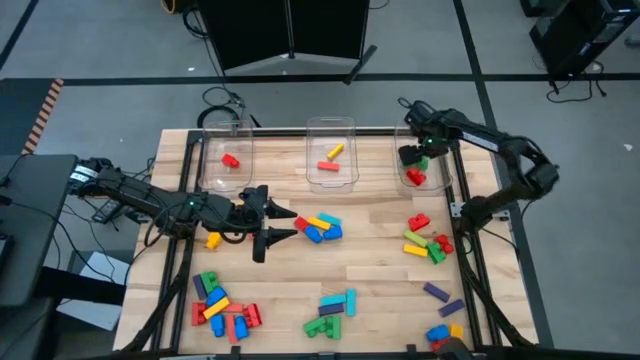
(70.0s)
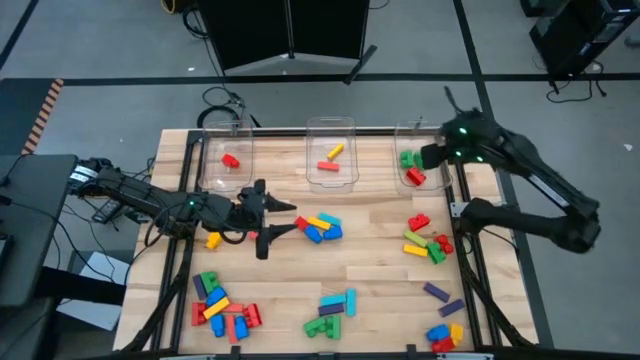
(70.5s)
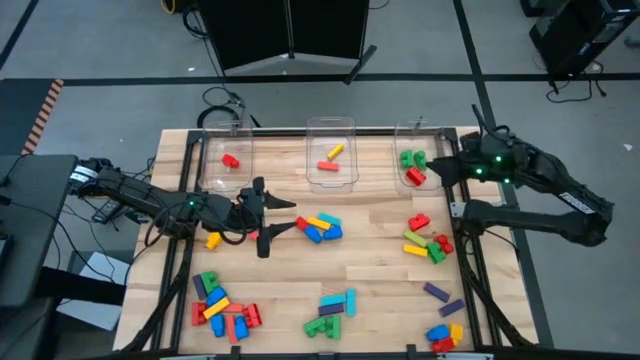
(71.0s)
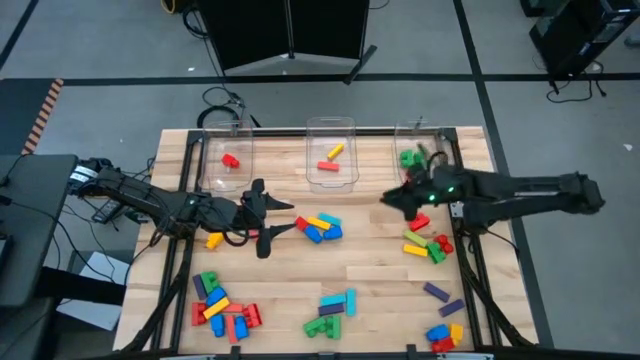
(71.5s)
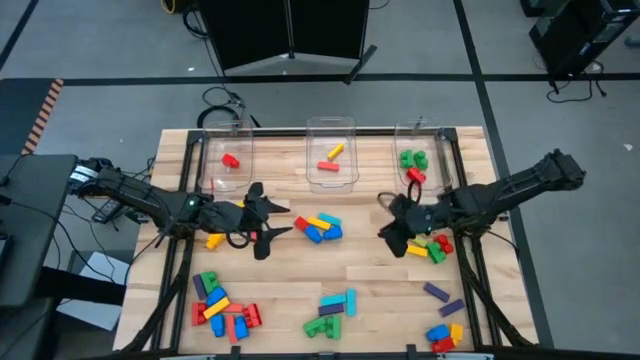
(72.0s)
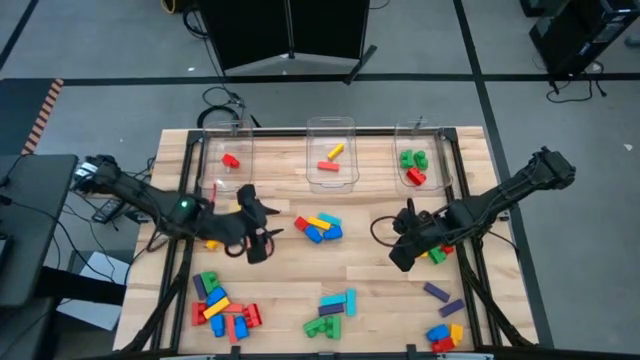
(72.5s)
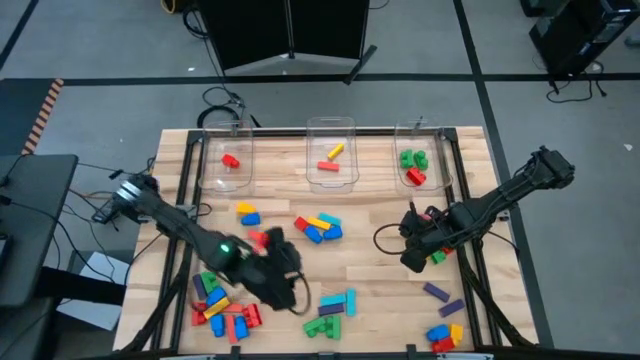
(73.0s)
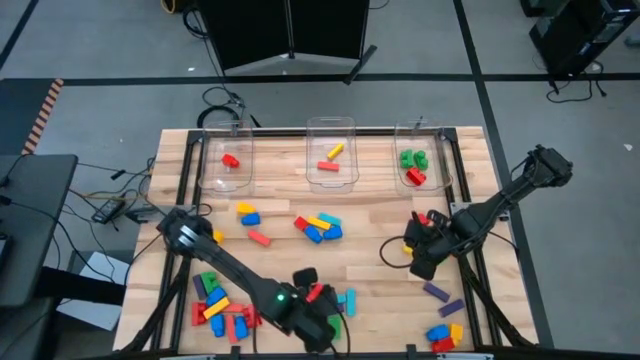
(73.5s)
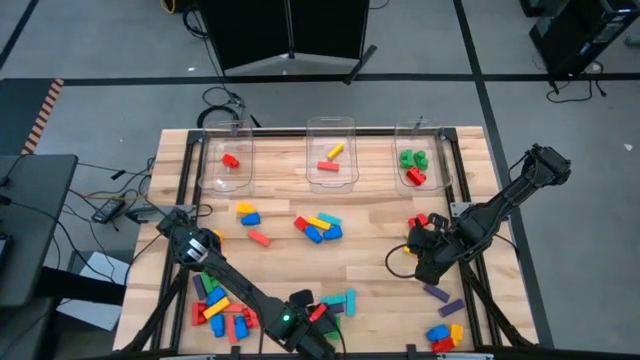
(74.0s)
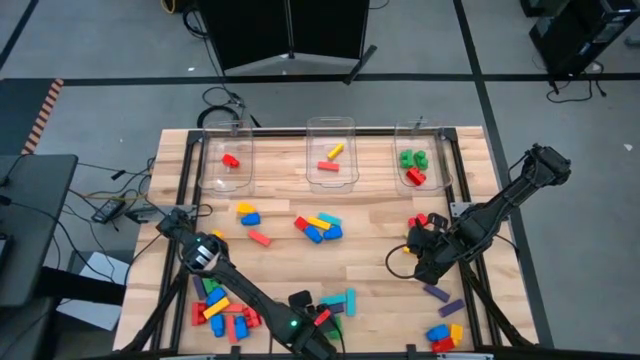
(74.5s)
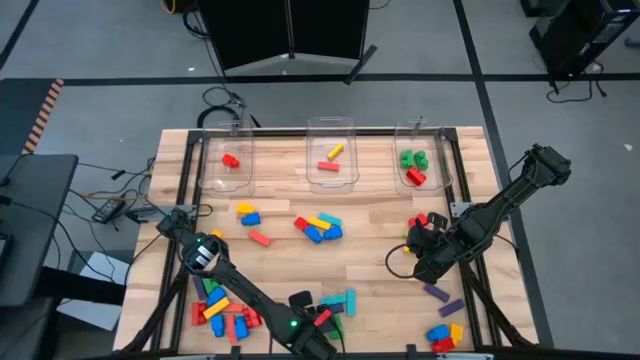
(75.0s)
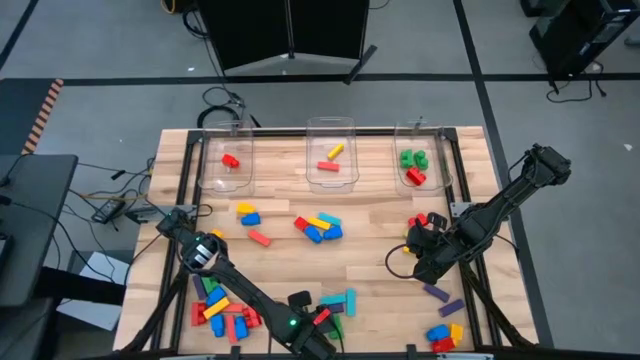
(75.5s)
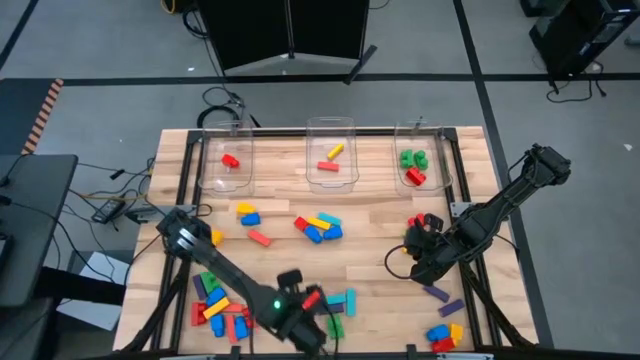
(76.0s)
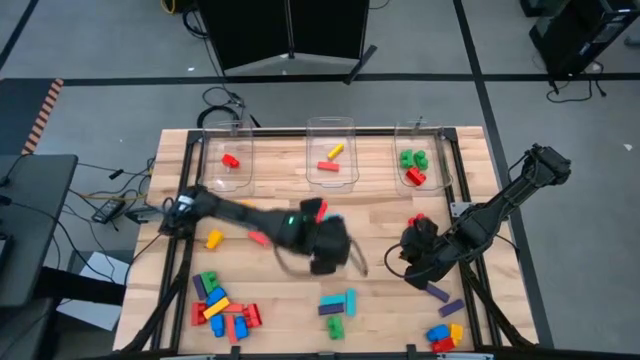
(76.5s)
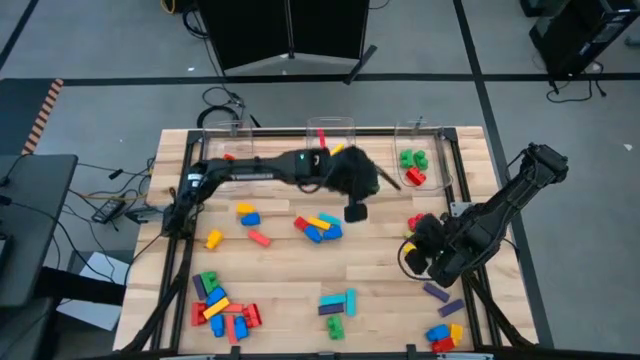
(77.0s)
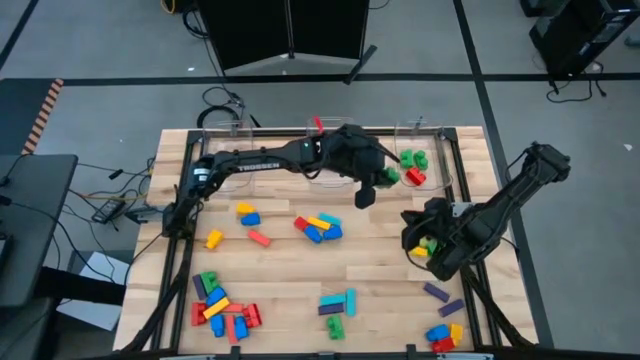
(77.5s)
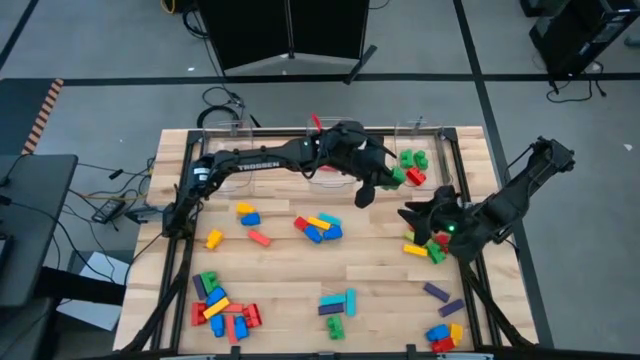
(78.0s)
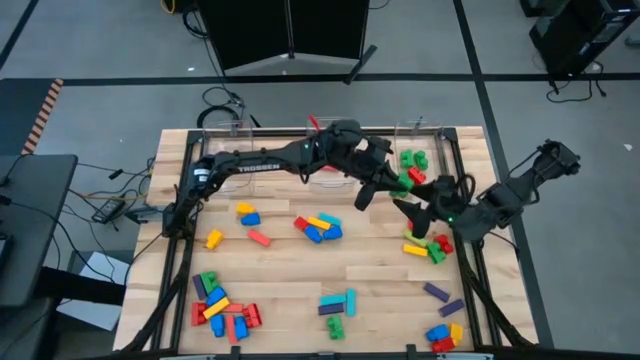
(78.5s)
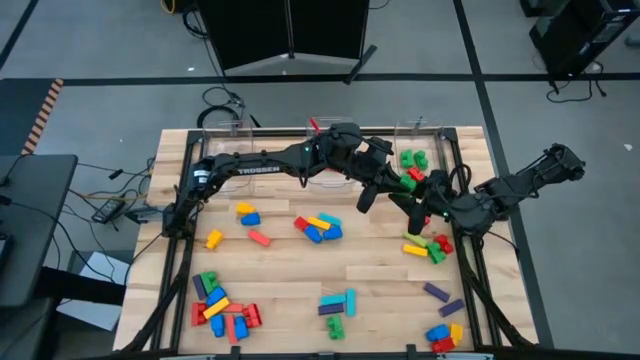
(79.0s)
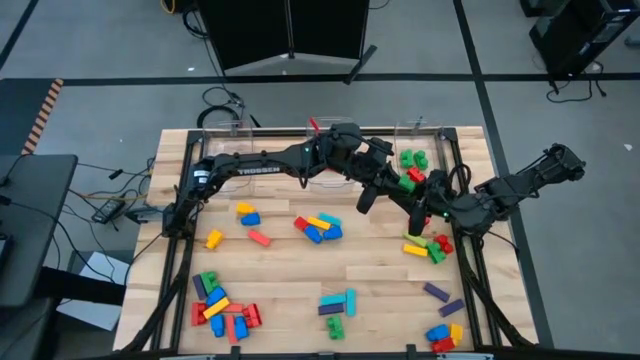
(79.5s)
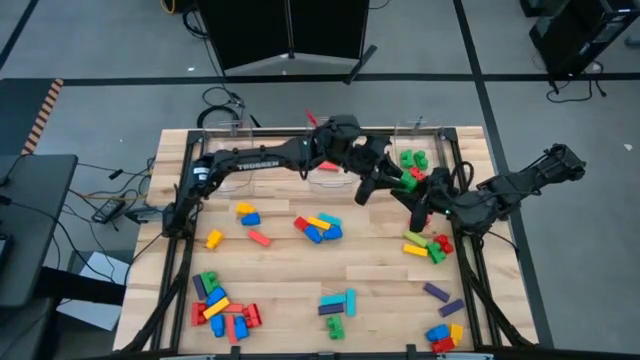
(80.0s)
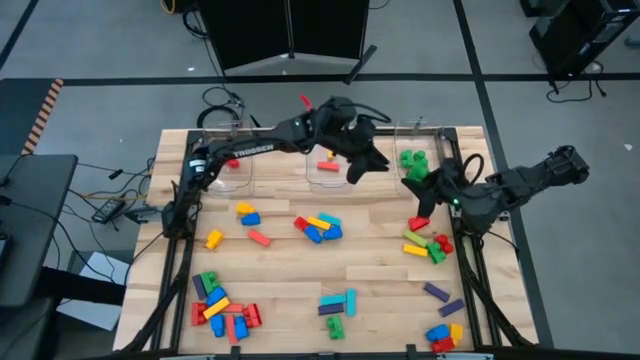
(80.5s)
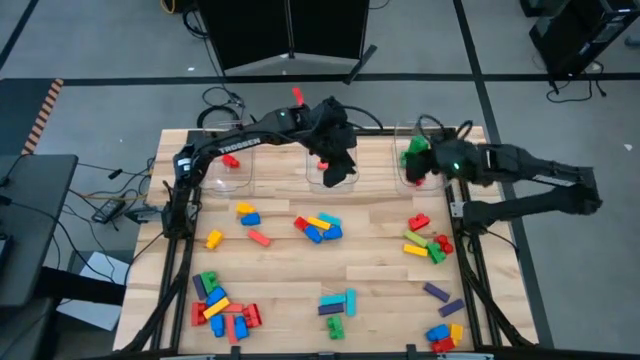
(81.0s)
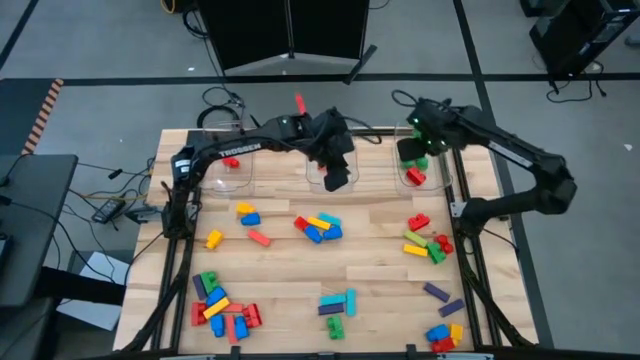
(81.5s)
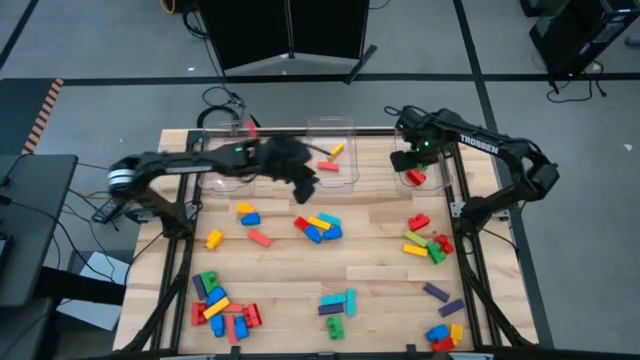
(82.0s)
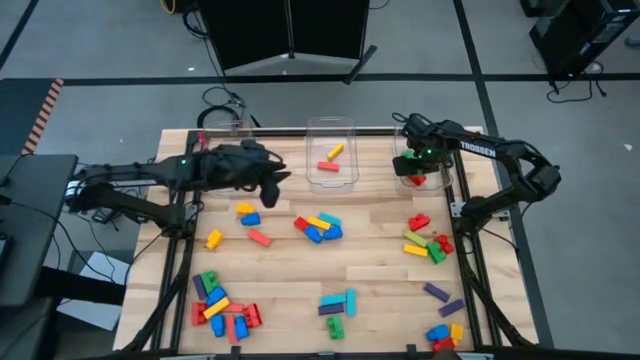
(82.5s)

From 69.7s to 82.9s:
Task: Sort blocks by size
Put the green 2 stud game piece into the right transparent bin

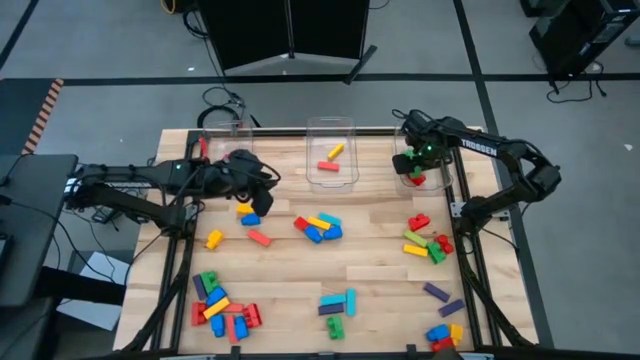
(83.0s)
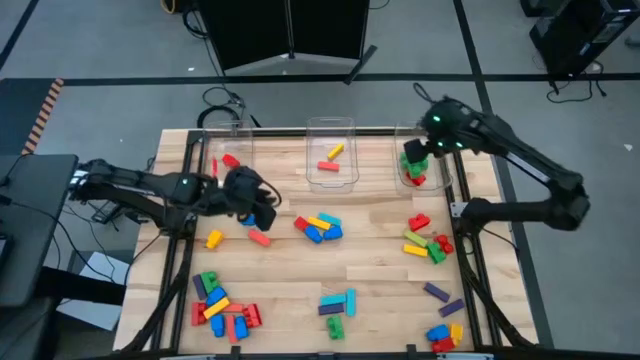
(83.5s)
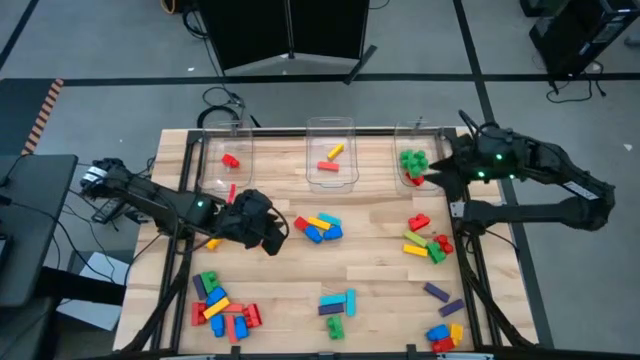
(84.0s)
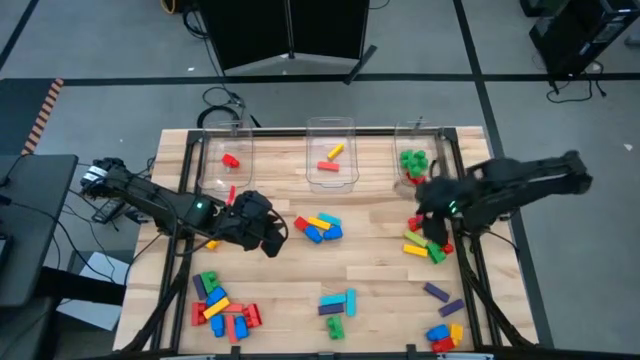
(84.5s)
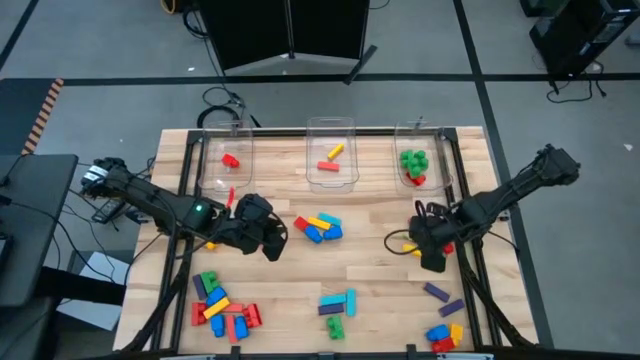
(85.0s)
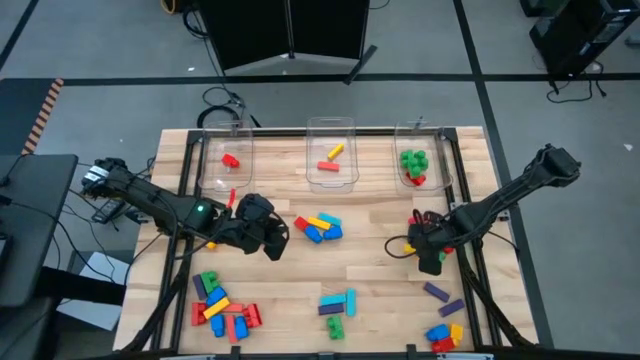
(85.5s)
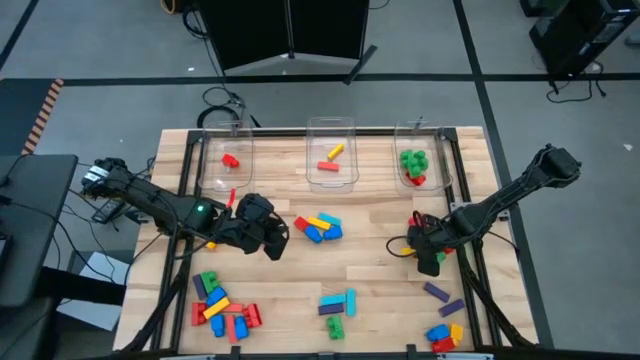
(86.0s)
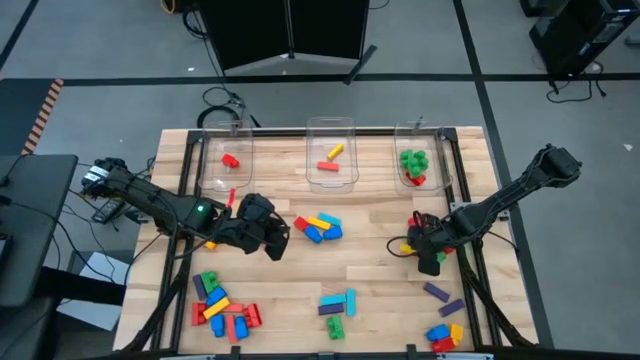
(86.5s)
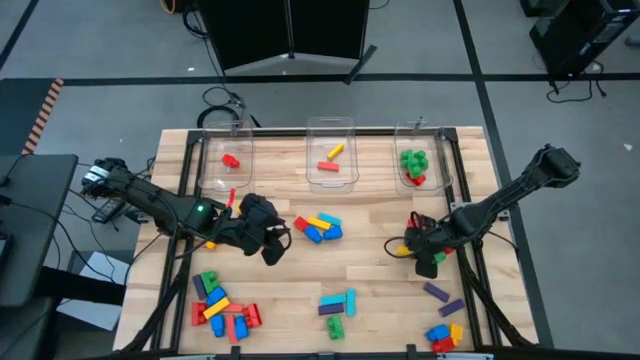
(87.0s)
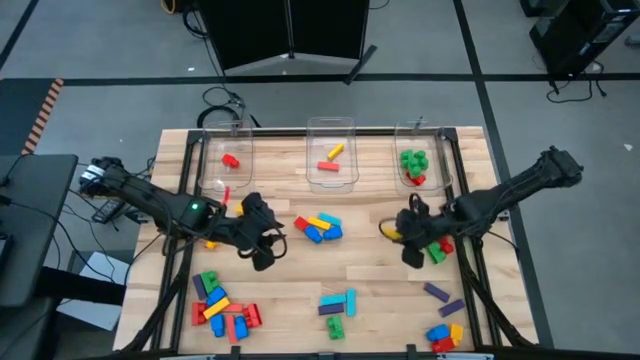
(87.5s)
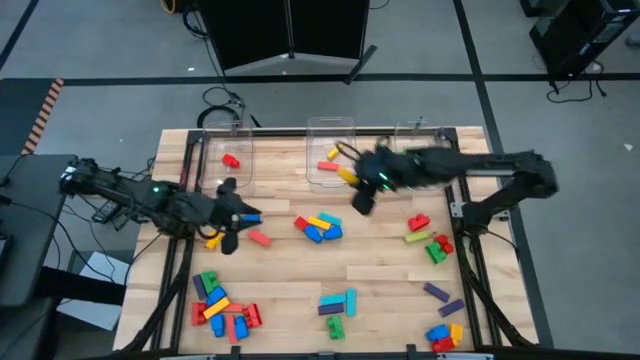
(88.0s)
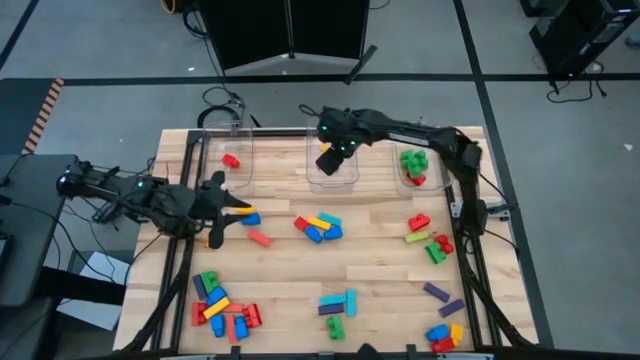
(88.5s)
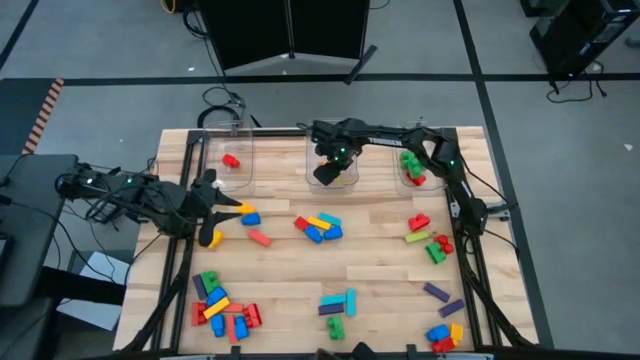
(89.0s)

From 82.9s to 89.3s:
Put the yellow block into the middle transparent bin

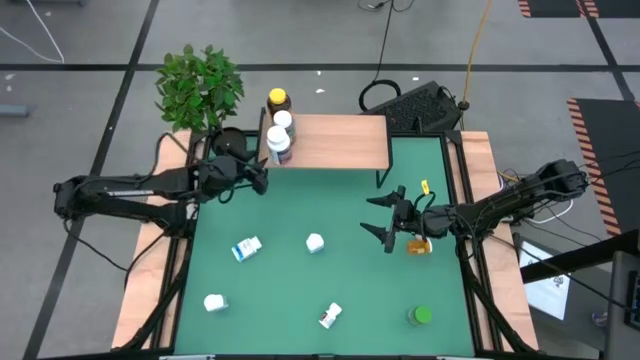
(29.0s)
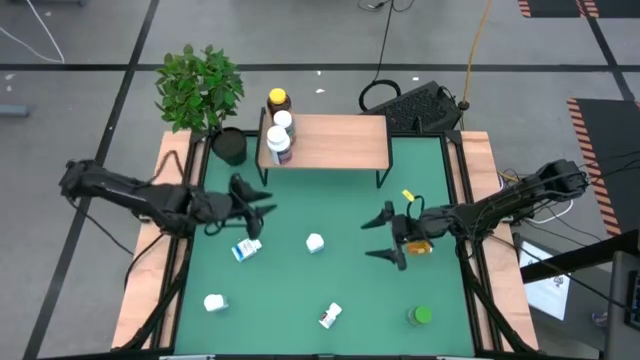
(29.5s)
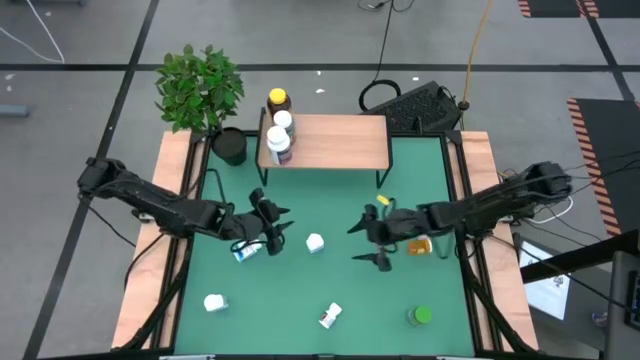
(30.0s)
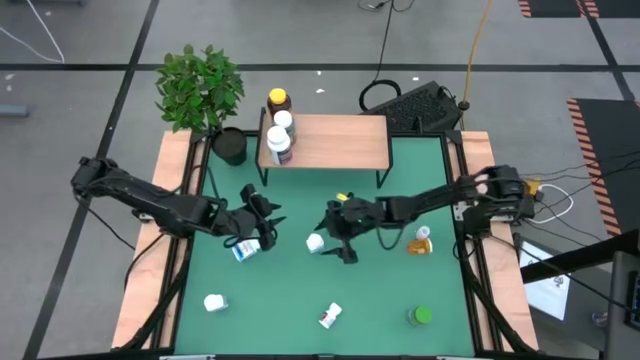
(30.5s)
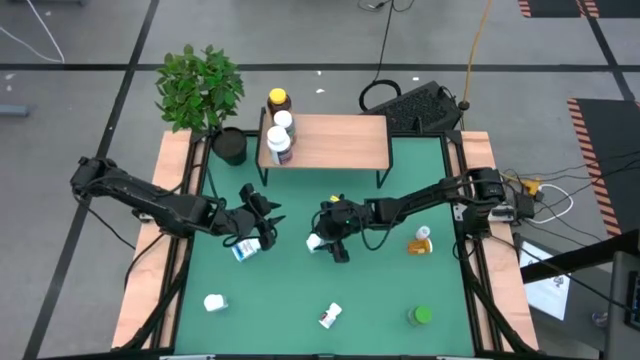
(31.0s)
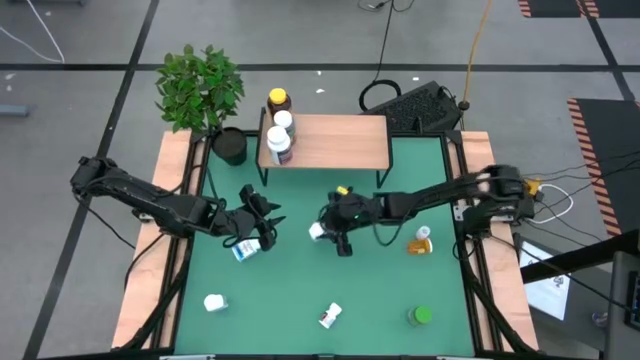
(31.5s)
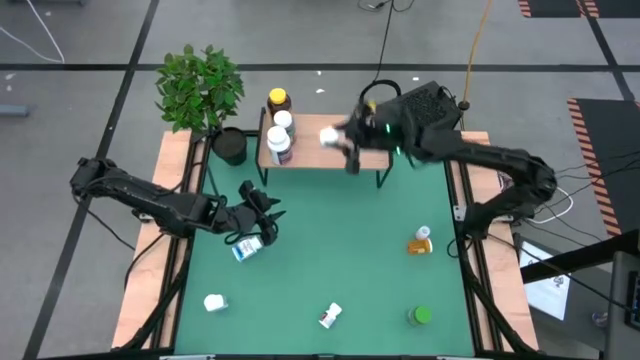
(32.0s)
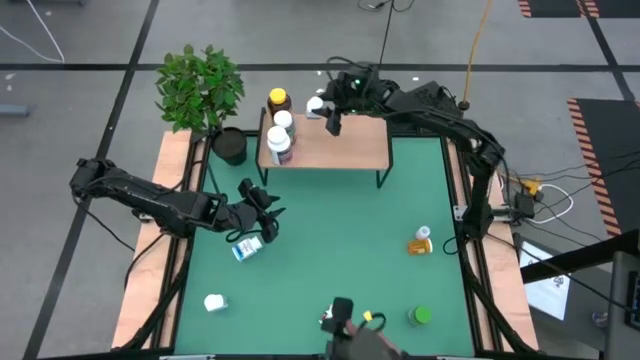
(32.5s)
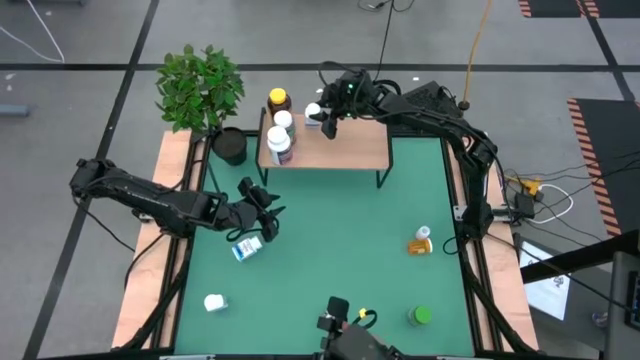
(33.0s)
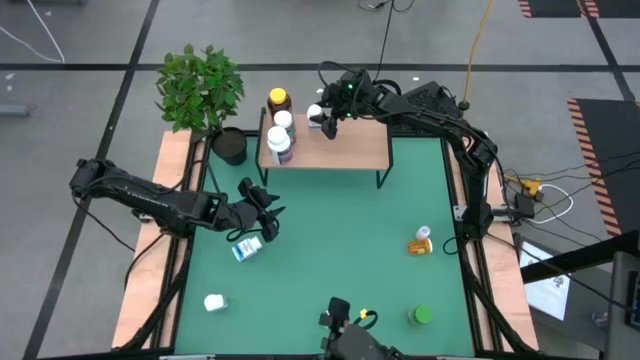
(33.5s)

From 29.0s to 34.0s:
Task: Pick and place medicine bottles onto shelf by color
Put the right white and blue medicine bottle on the shelf
